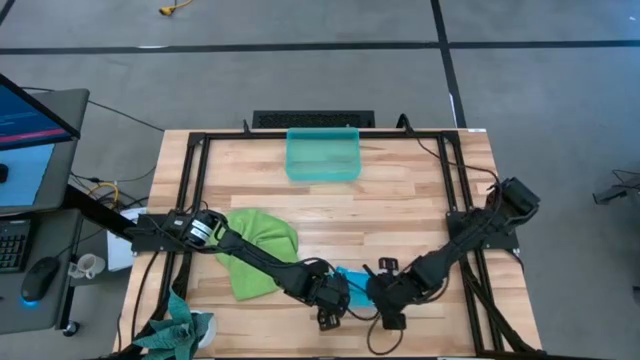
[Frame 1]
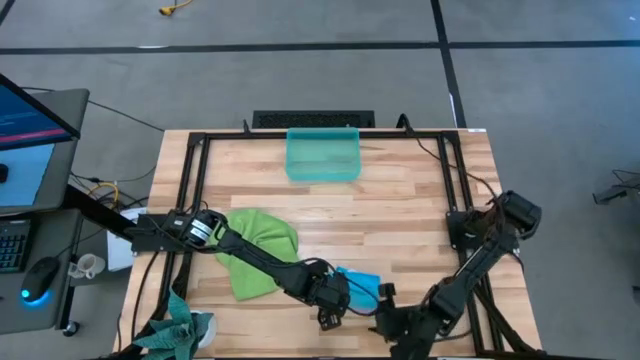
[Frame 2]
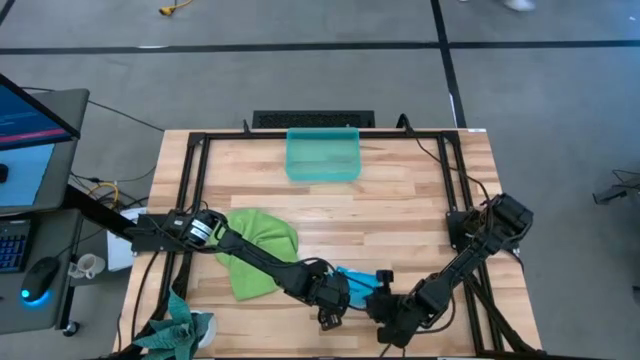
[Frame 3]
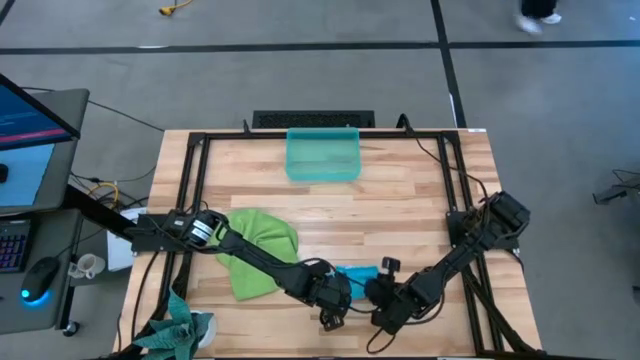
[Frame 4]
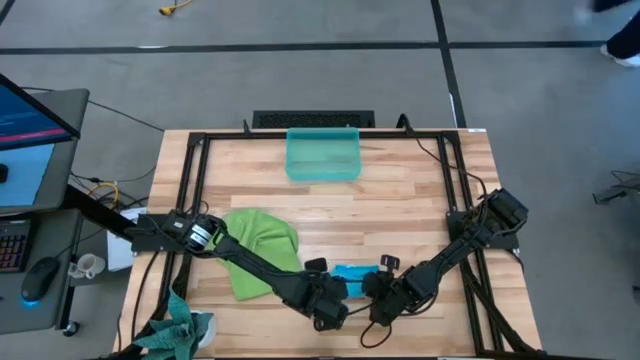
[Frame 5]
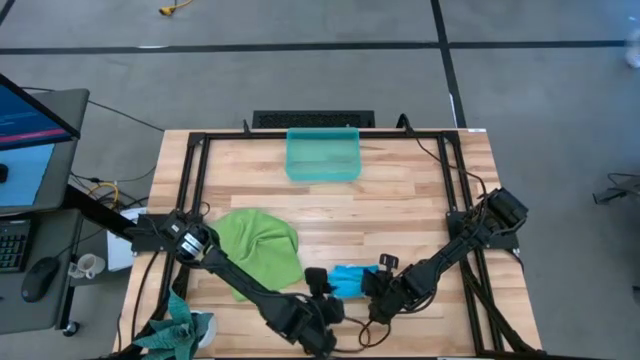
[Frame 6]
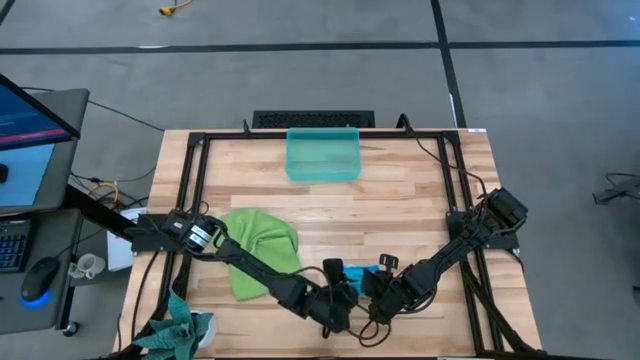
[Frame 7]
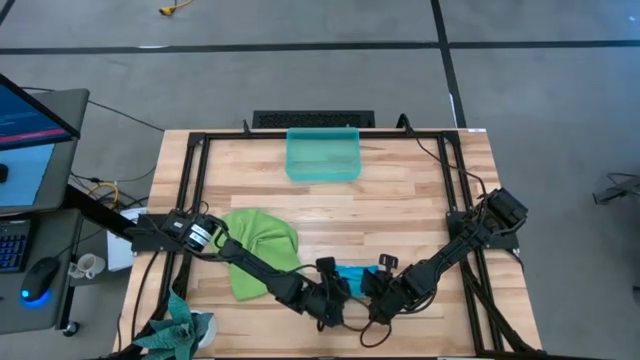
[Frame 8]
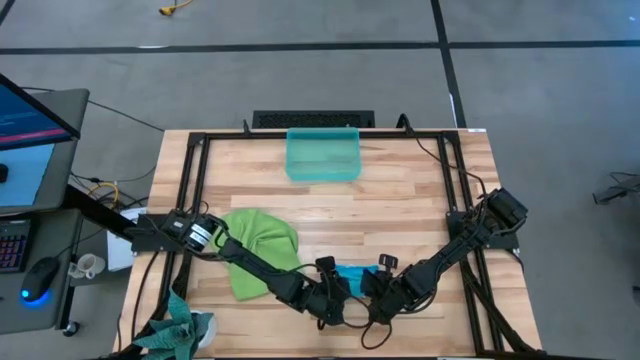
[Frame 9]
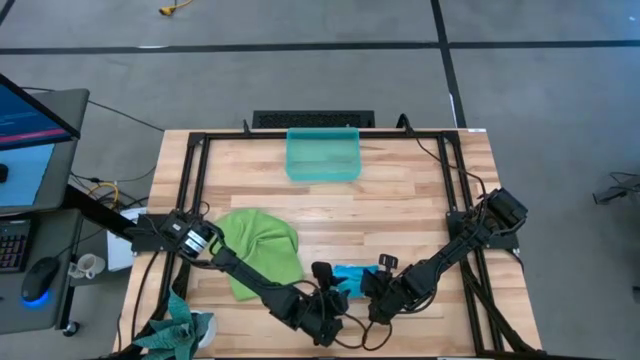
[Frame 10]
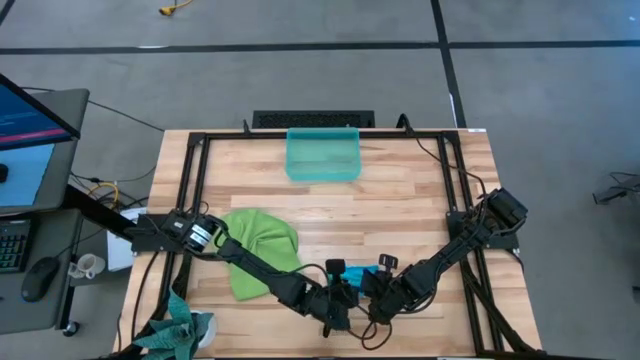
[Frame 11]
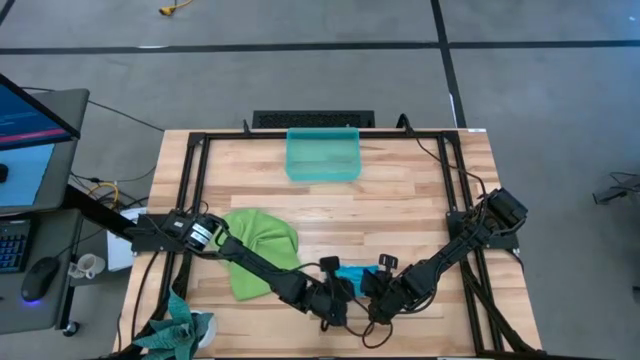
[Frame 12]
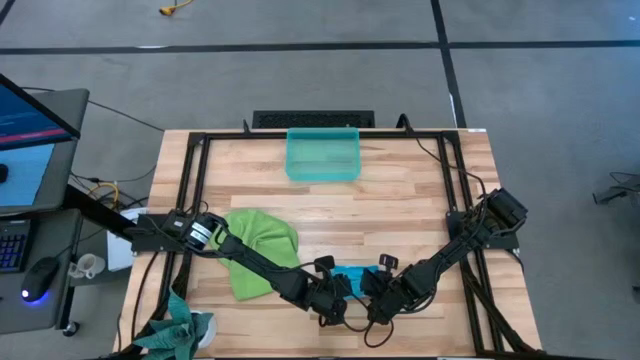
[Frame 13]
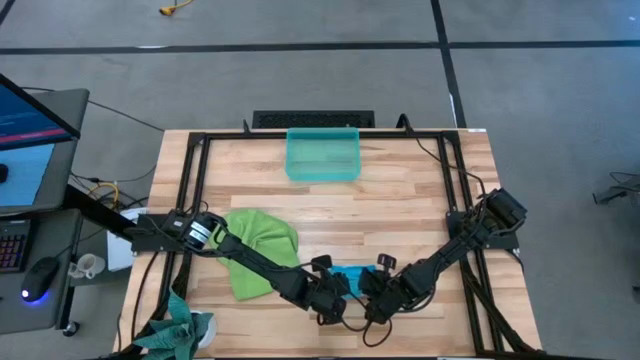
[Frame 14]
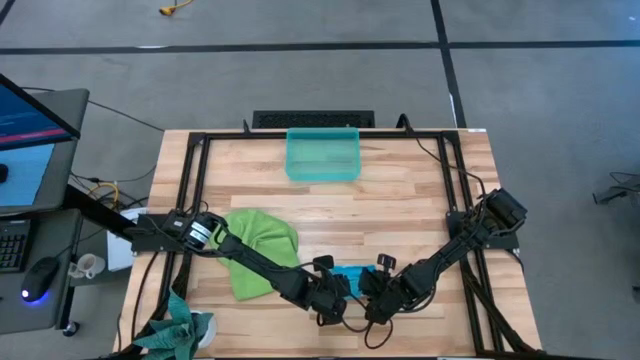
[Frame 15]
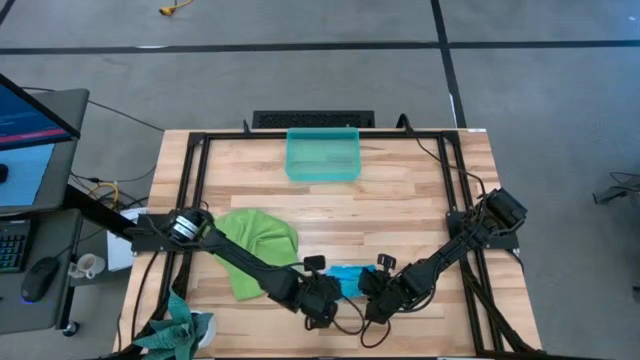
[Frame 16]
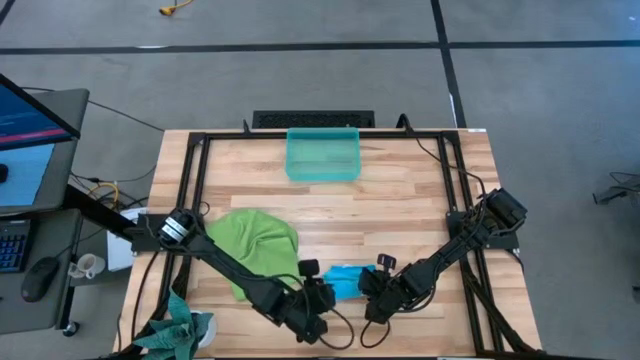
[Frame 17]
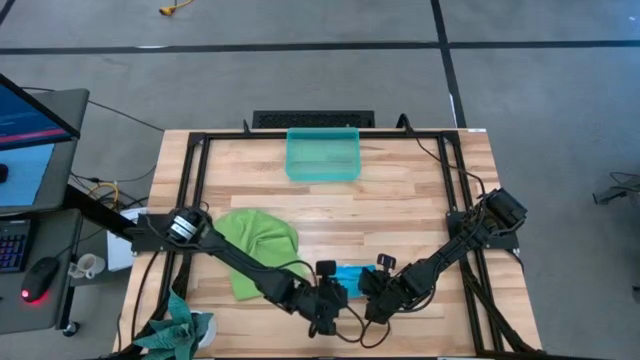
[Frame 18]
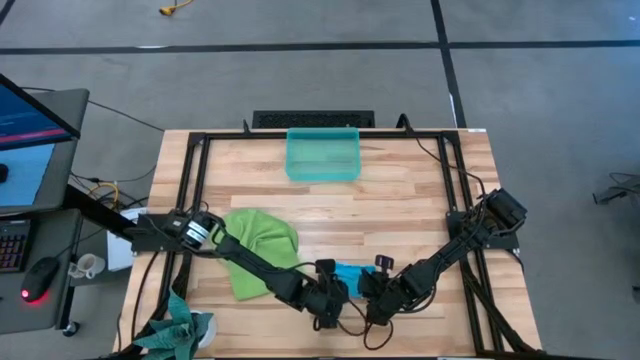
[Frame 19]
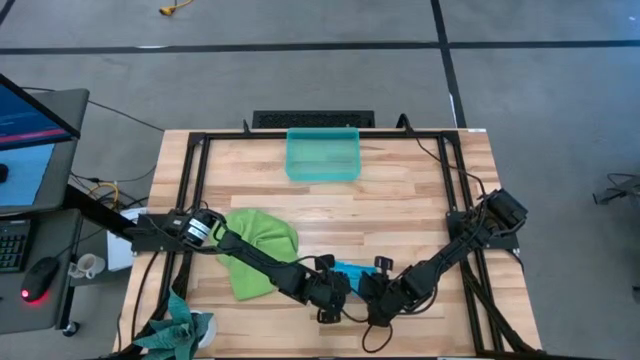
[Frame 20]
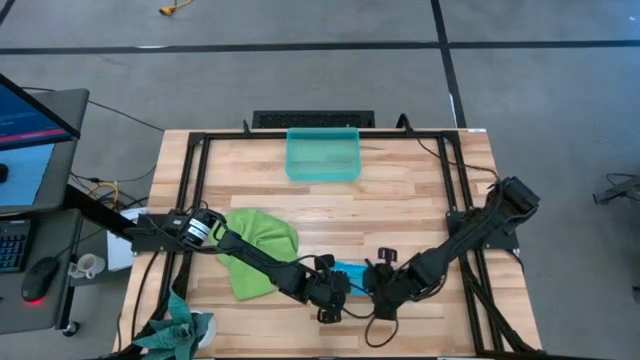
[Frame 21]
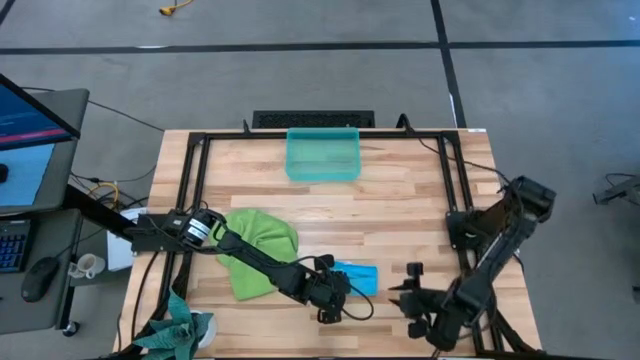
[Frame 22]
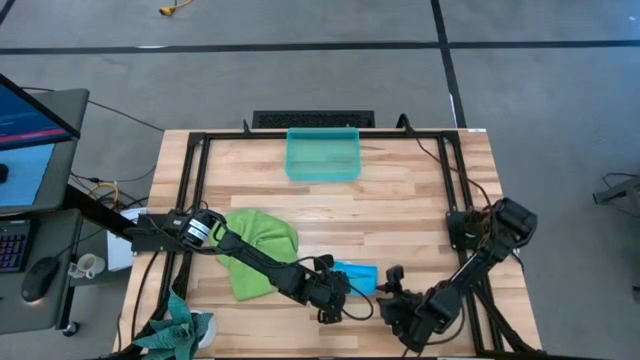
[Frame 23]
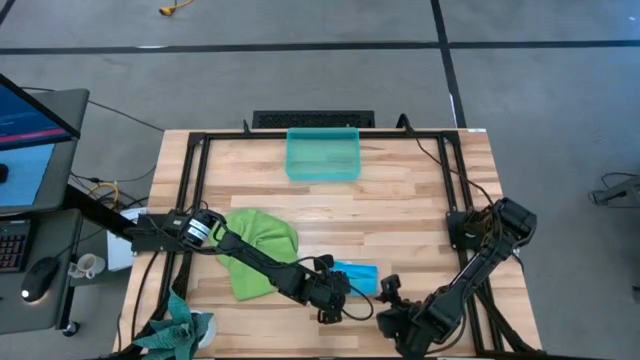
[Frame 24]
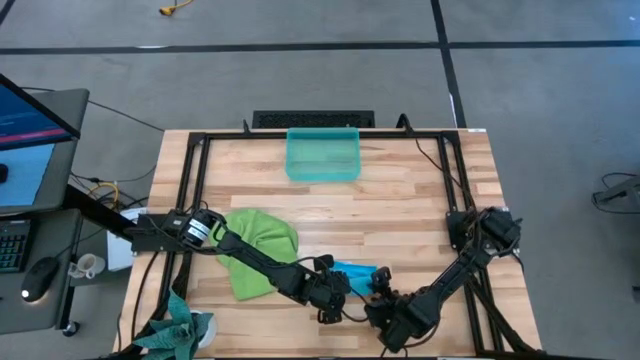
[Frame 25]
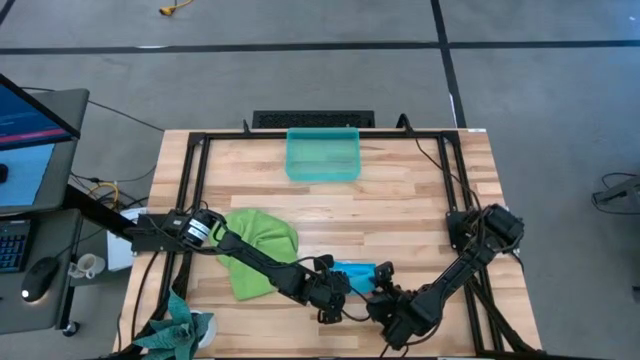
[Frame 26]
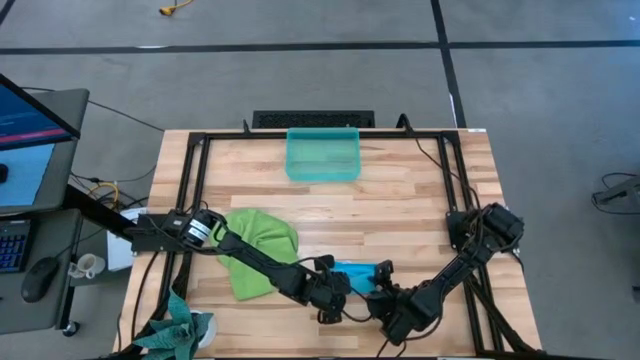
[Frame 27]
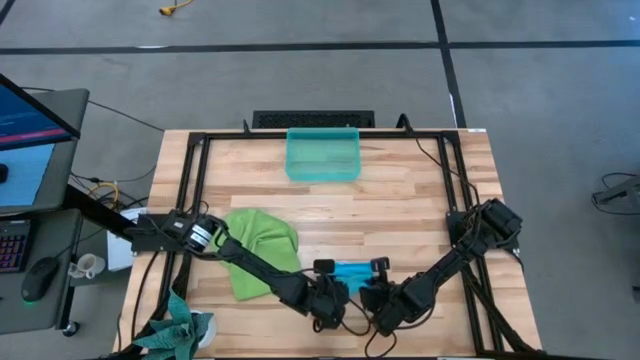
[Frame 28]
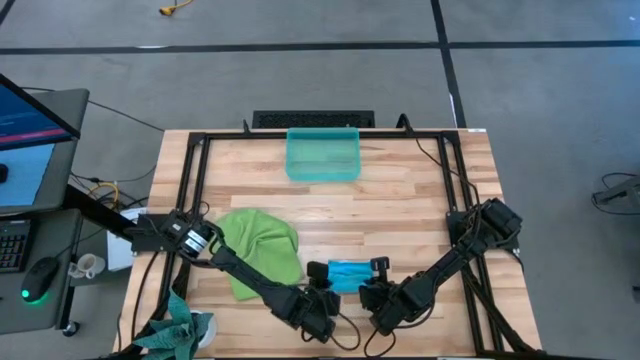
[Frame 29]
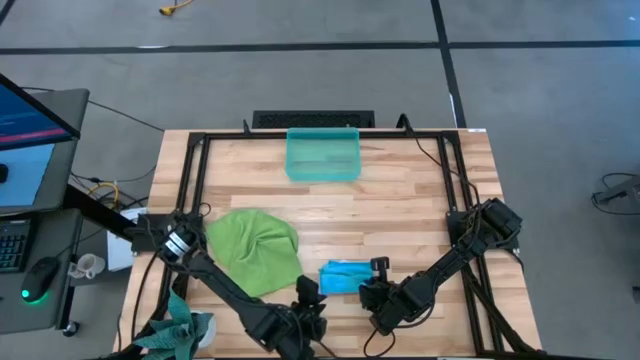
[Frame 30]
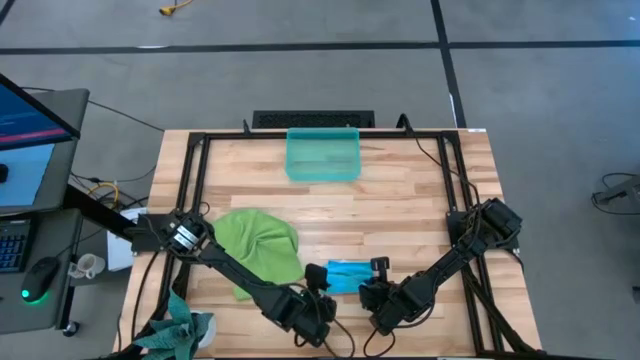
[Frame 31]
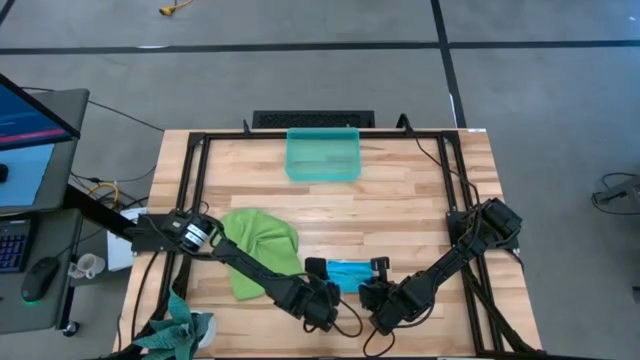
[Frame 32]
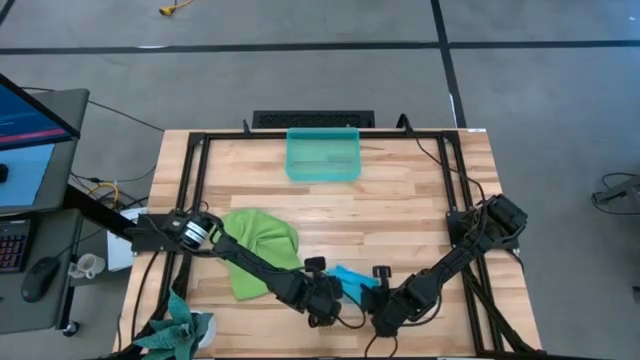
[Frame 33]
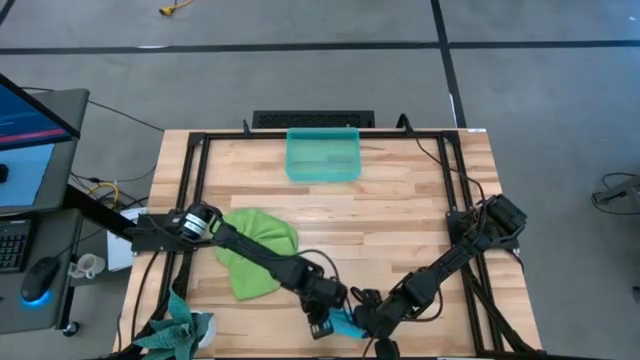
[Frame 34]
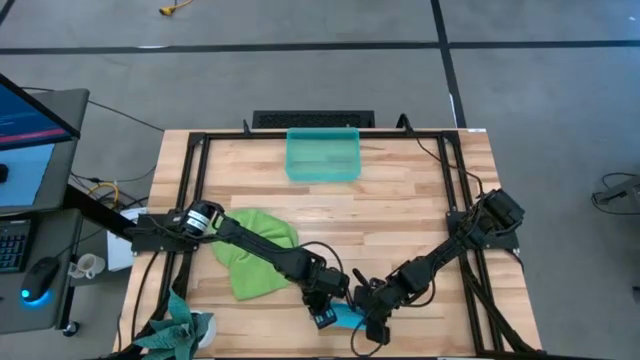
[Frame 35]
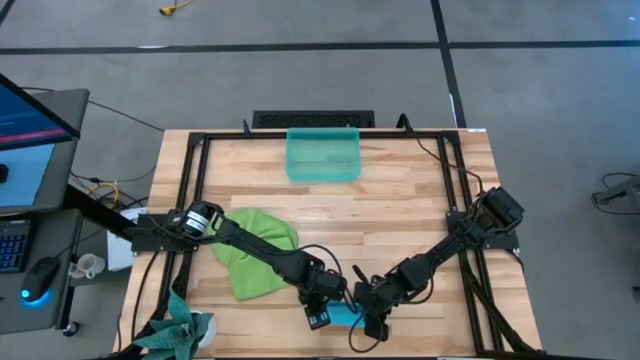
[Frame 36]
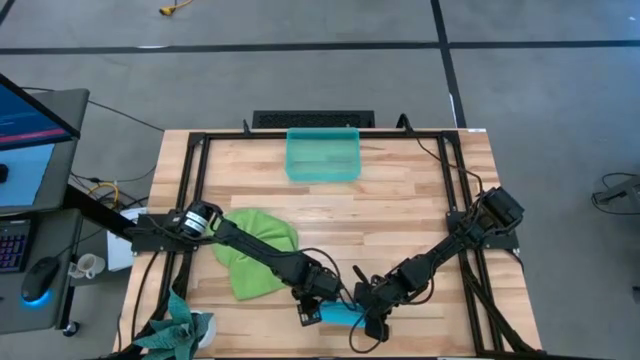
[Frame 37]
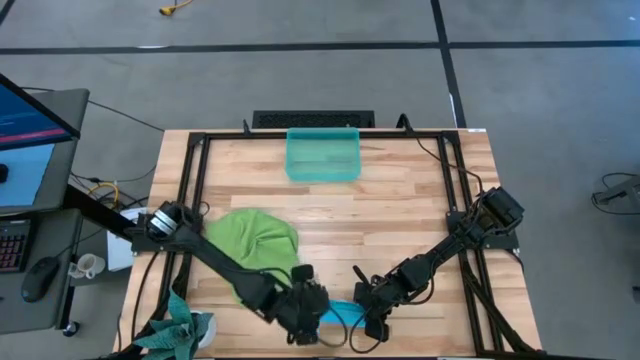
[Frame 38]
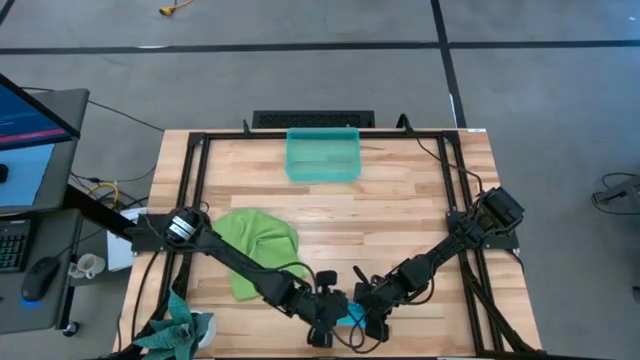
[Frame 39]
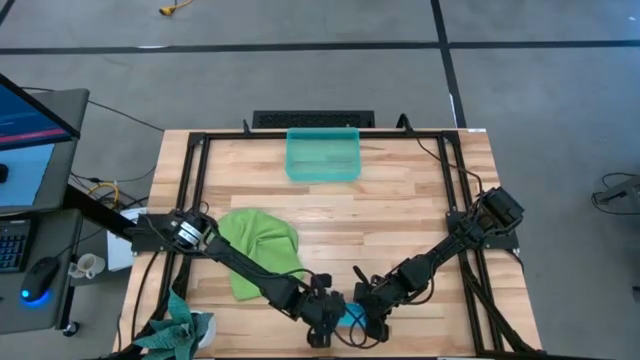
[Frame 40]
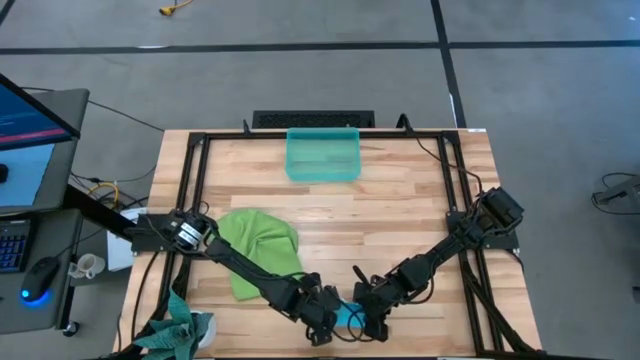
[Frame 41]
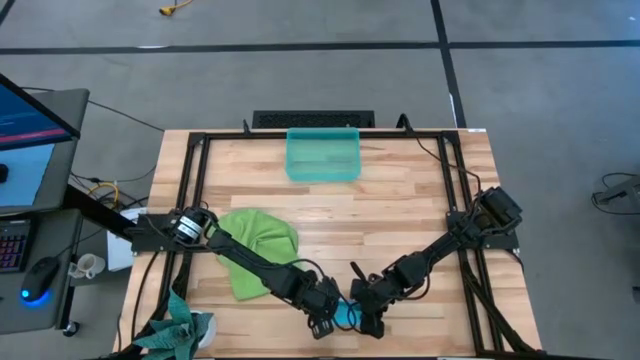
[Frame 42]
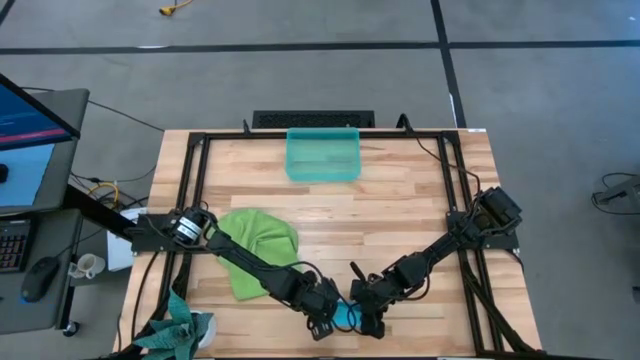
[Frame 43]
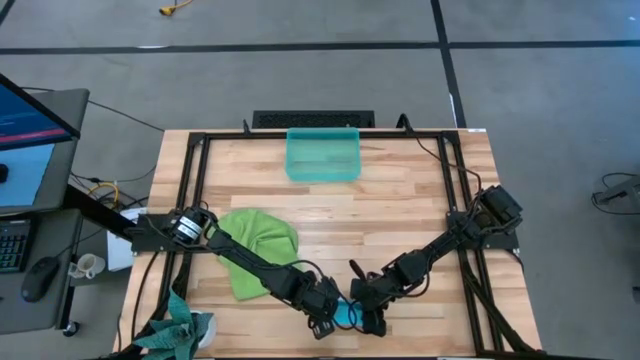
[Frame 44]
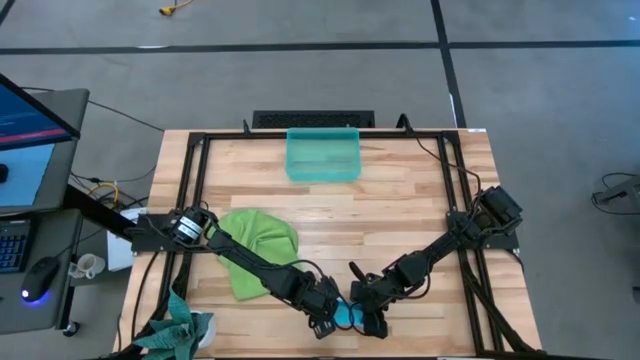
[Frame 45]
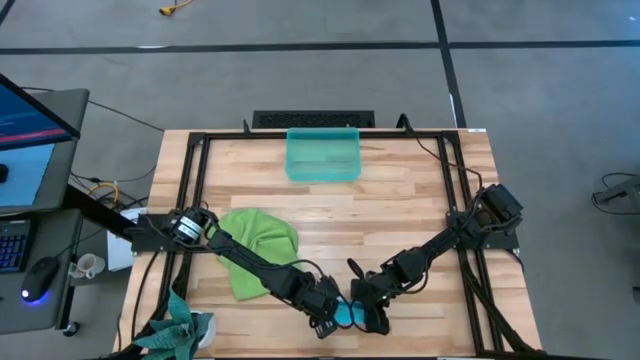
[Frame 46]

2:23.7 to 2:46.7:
Task: Roll microfiber towels into tight, uniform cylinder then place into a basket
Roll the blue microfiber cloth
